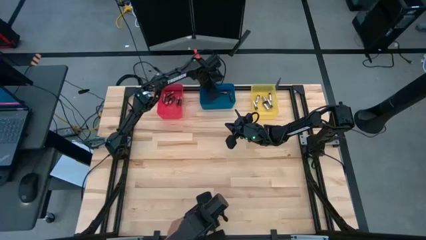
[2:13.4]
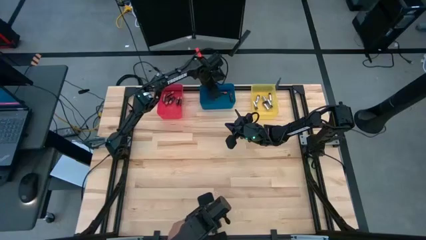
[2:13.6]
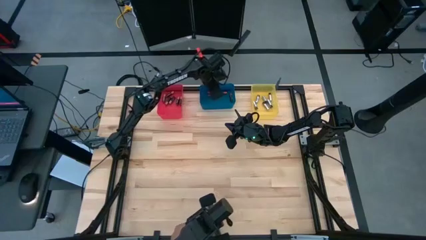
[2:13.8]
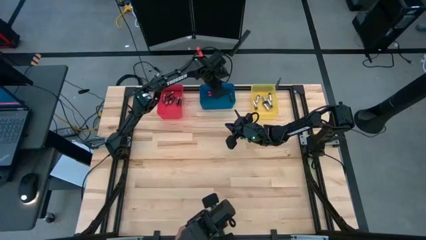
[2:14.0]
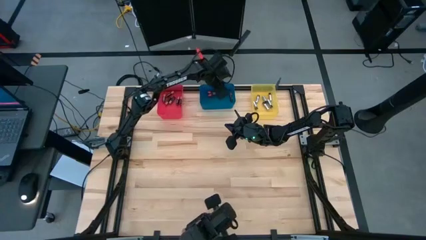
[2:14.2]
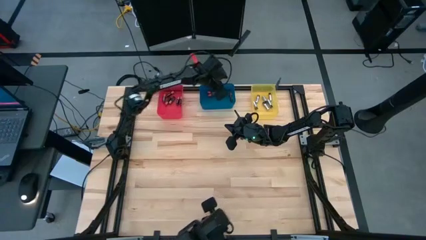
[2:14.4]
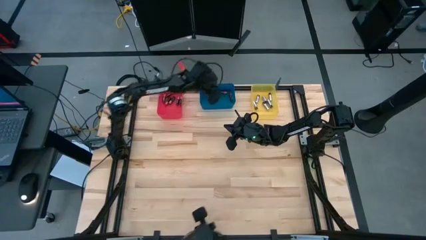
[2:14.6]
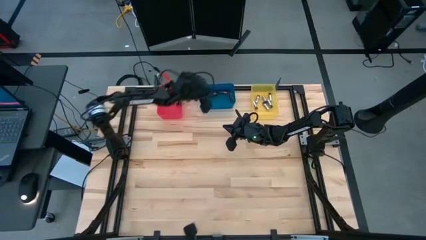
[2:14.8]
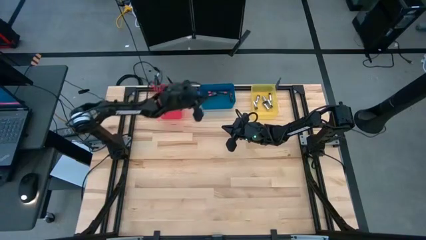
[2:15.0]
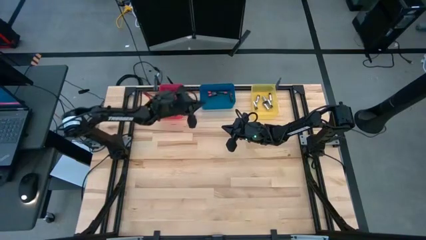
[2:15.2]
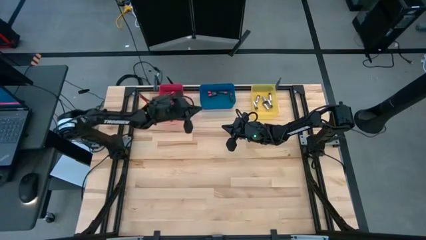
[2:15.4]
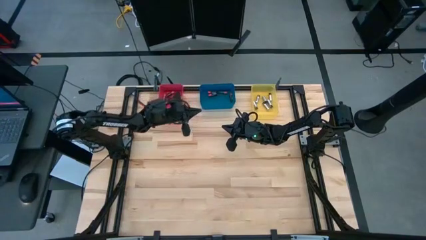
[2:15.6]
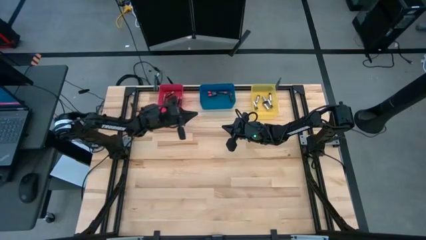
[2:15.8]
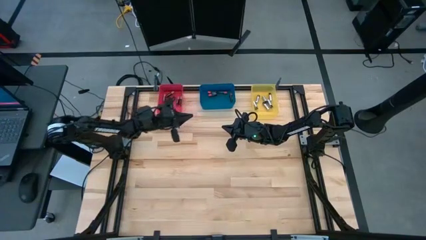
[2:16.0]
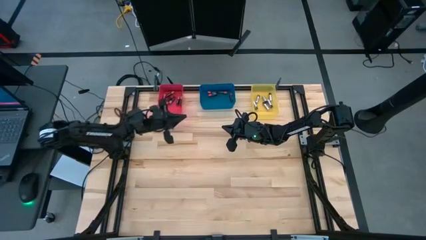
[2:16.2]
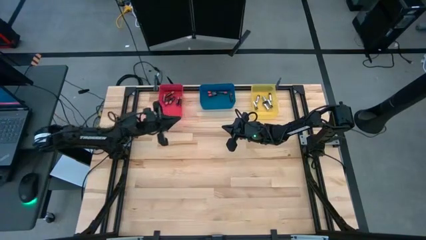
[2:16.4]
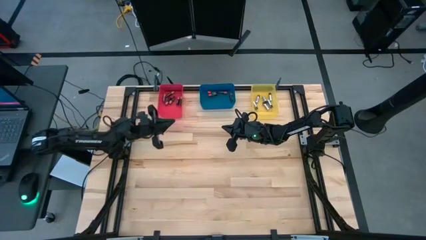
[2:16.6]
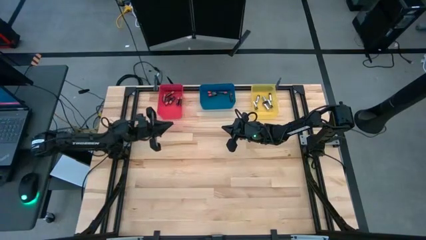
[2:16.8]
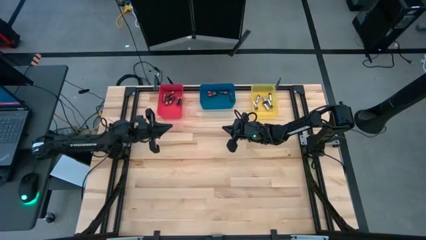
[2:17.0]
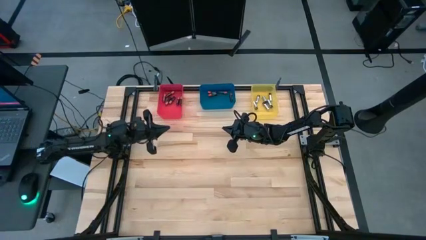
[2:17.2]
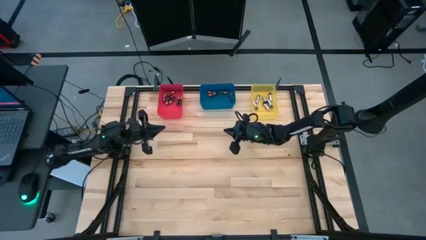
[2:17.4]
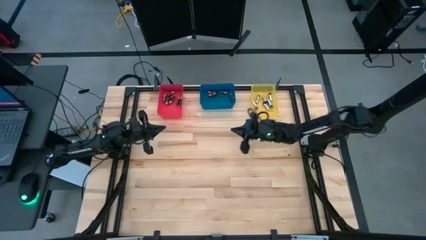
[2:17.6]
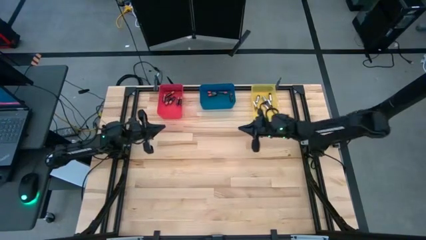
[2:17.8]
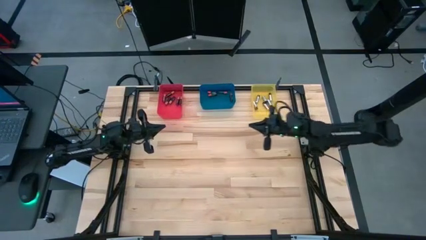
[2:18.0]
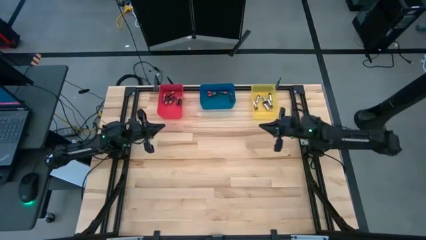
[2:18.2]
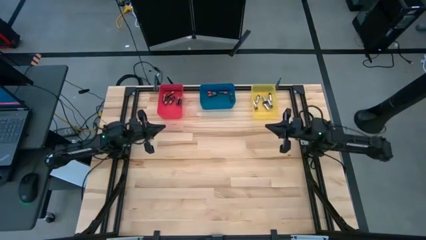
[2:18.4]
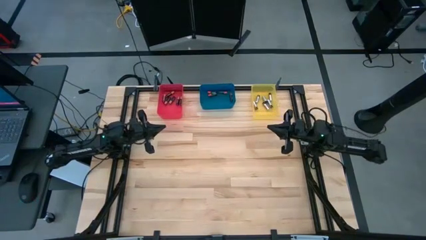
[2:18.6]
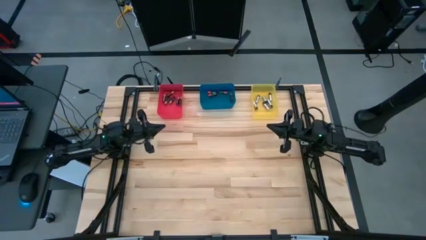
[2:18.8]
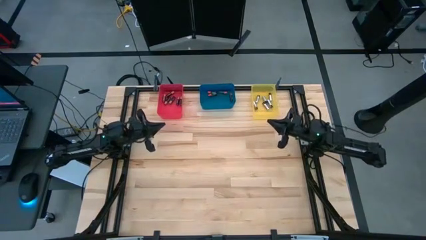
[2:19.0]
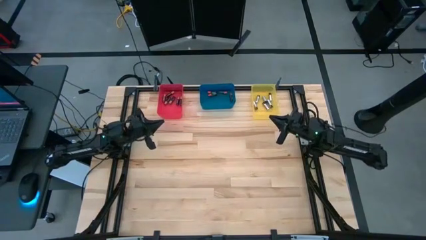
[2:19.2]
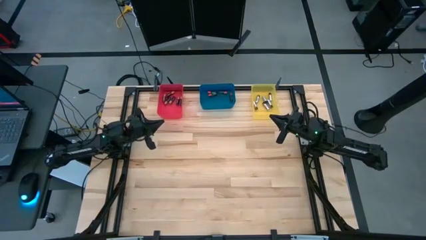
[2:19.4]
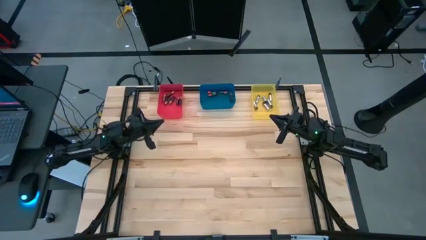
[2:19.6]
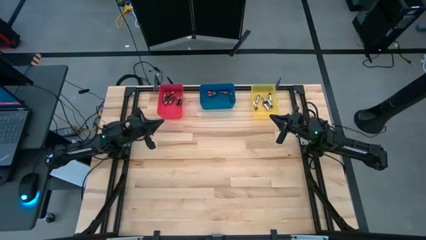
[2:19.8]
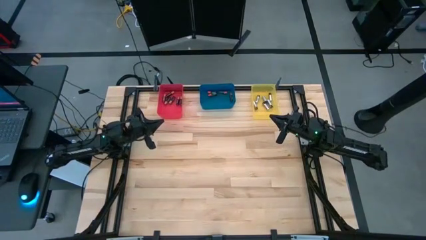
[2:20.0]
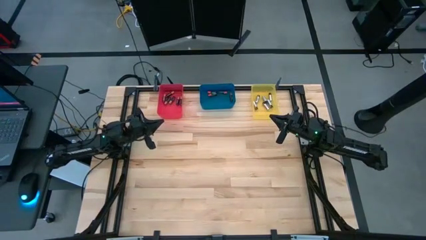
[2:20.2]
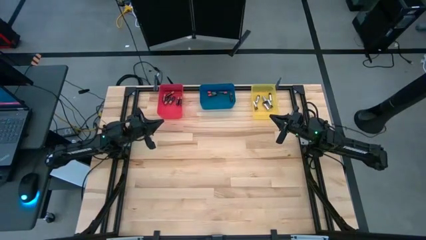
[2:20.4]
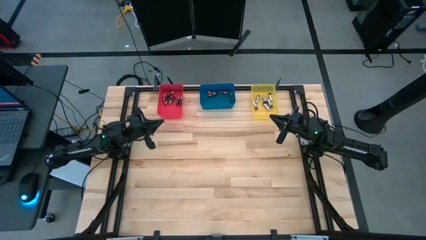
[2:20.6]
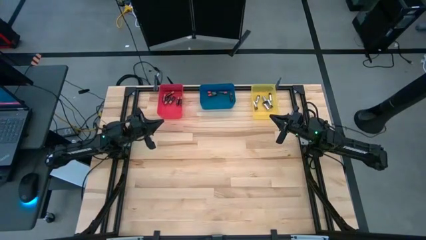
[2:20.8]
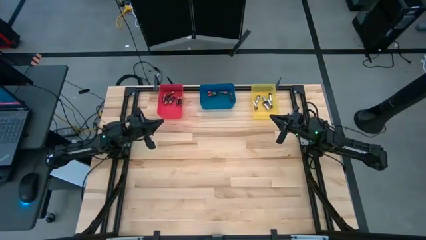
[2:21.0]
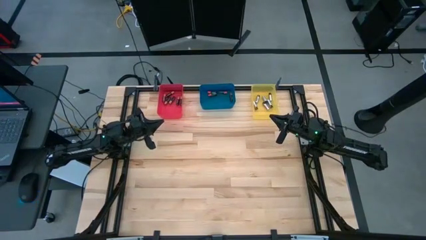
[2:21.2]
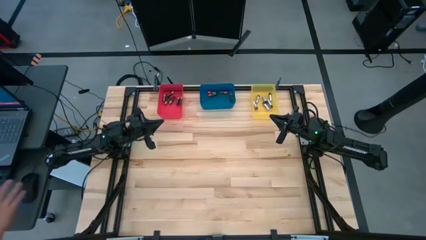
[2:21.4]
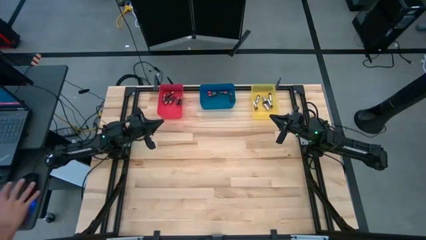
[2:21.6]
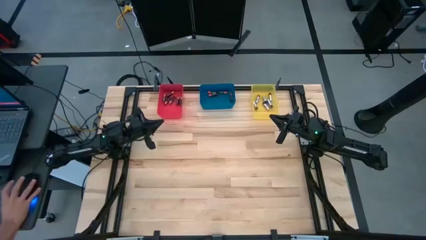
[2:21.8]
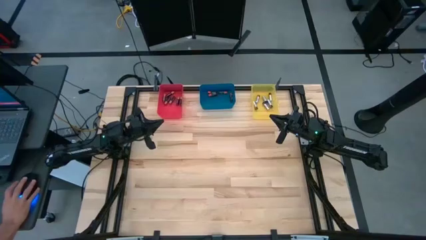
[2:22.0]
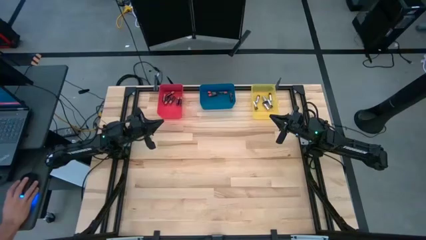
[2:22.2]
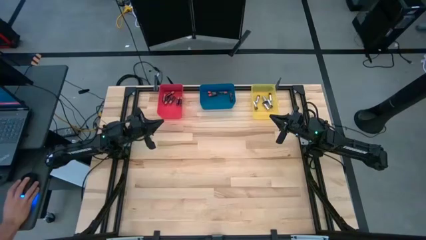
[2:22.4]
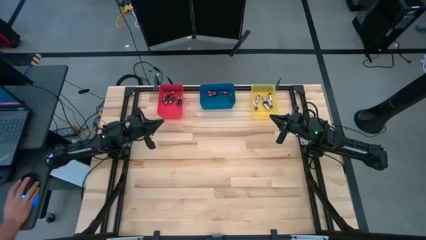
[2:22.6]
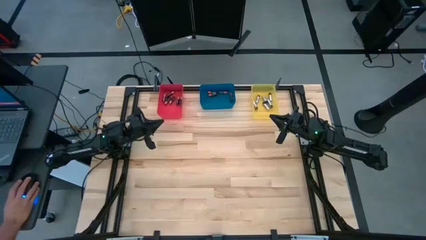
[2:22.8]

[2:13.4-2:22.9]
Task: Sort batteries
Return to Home Position

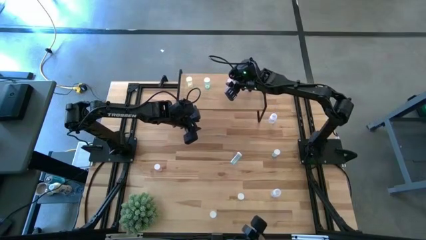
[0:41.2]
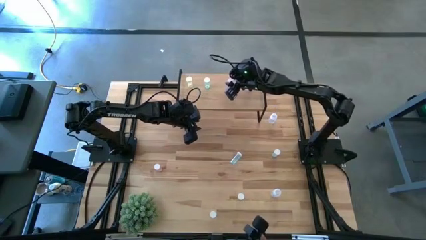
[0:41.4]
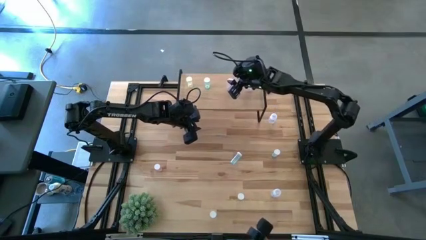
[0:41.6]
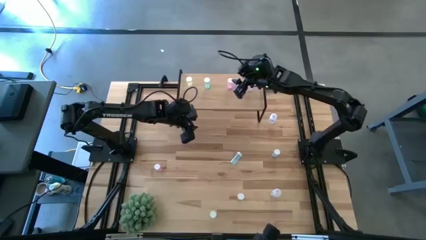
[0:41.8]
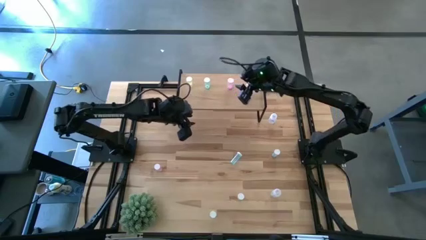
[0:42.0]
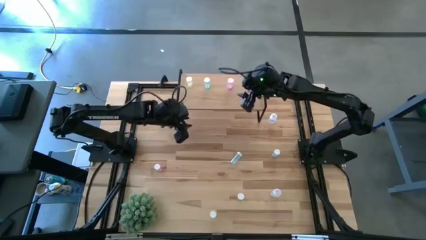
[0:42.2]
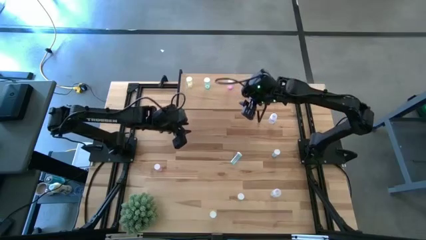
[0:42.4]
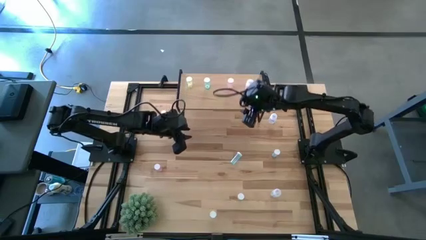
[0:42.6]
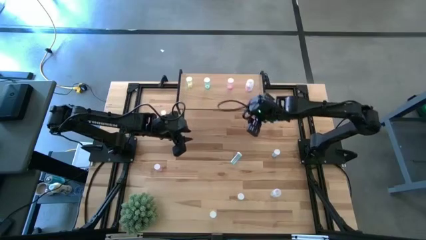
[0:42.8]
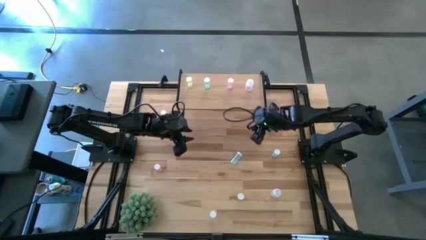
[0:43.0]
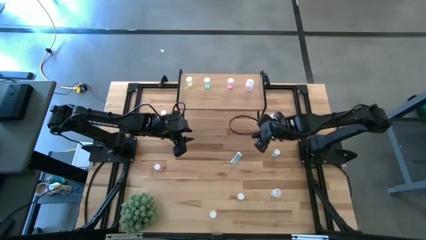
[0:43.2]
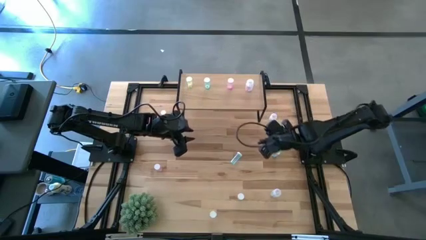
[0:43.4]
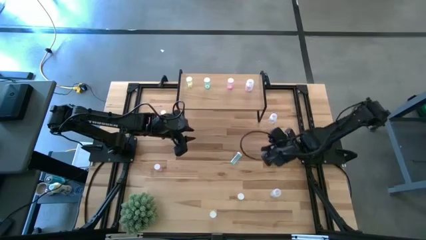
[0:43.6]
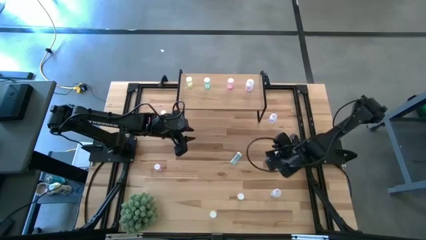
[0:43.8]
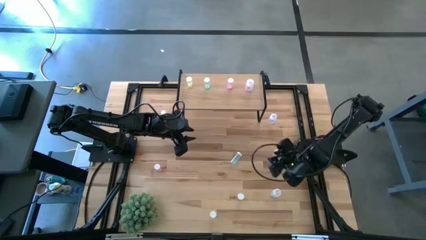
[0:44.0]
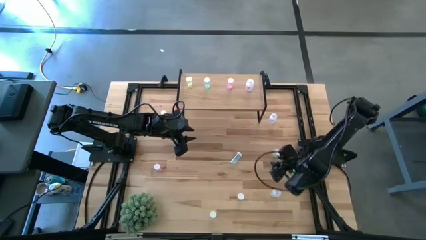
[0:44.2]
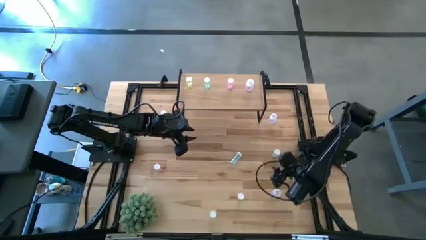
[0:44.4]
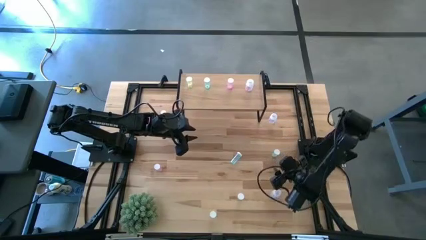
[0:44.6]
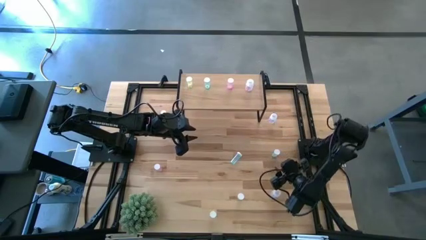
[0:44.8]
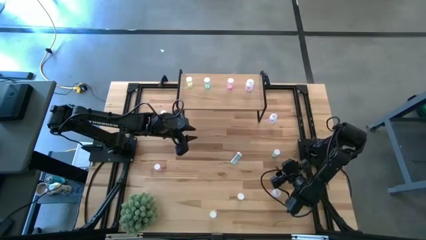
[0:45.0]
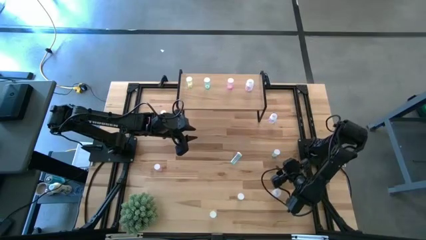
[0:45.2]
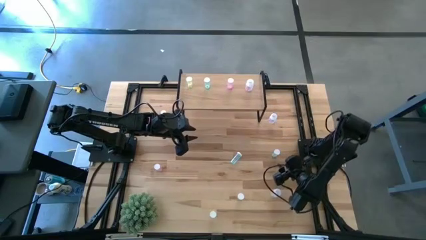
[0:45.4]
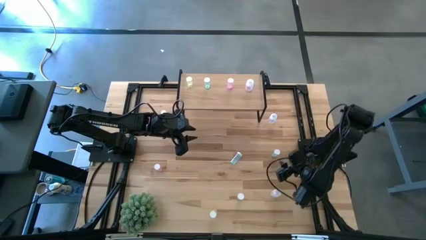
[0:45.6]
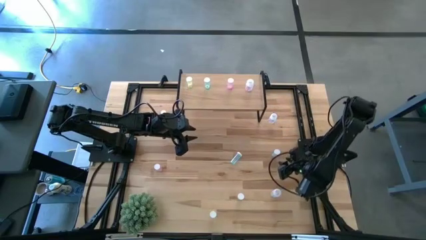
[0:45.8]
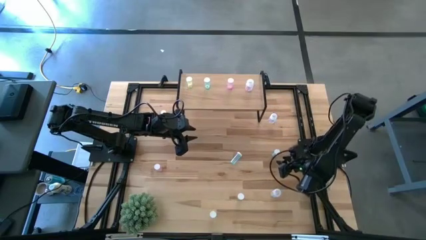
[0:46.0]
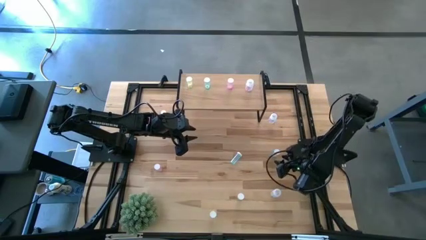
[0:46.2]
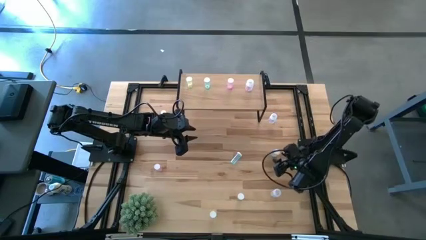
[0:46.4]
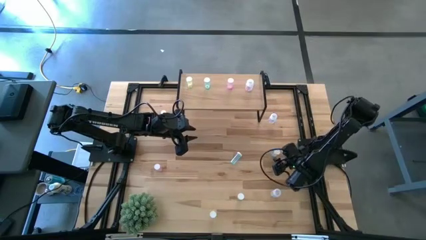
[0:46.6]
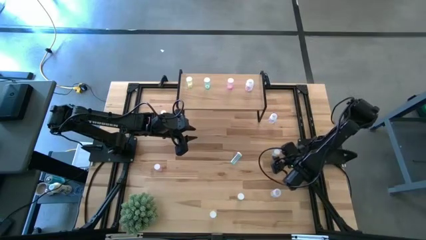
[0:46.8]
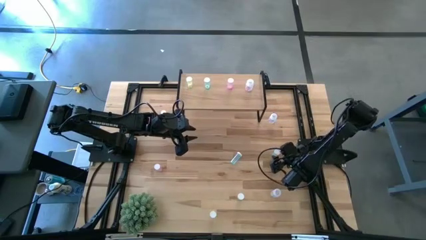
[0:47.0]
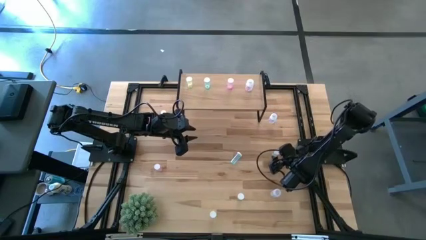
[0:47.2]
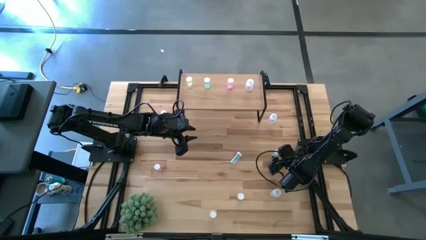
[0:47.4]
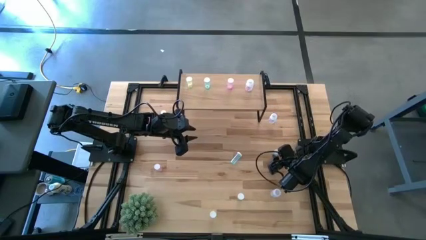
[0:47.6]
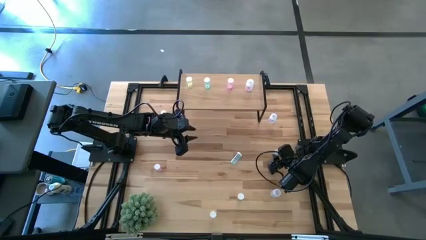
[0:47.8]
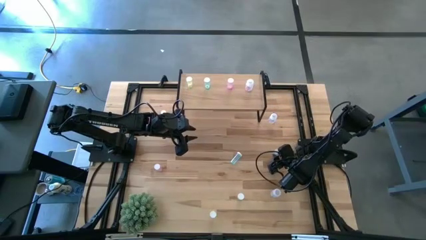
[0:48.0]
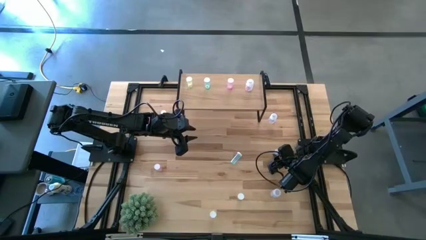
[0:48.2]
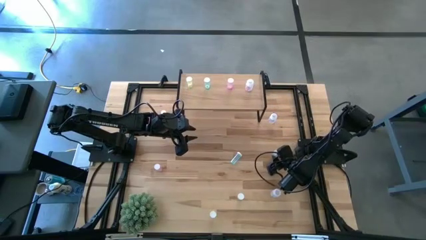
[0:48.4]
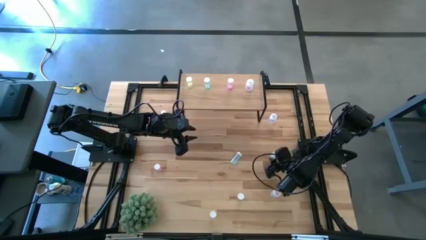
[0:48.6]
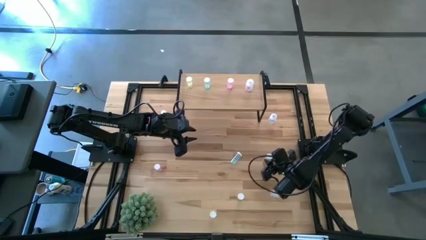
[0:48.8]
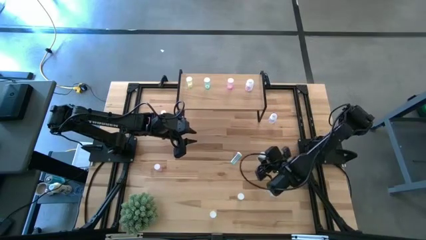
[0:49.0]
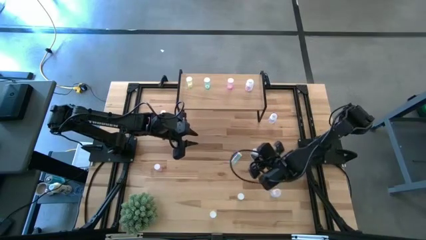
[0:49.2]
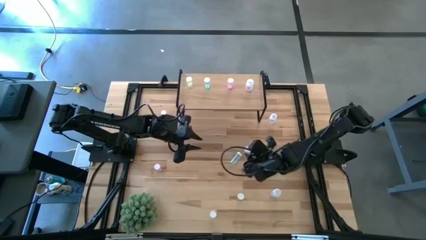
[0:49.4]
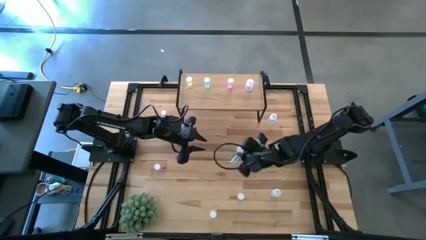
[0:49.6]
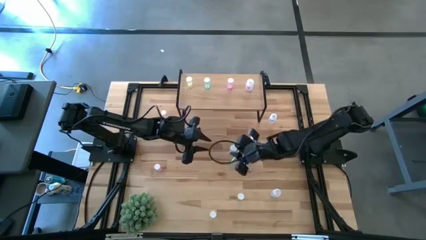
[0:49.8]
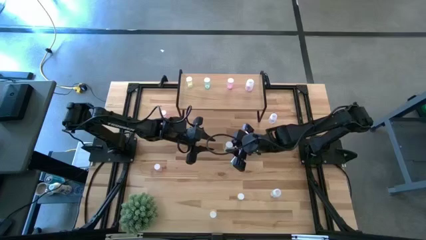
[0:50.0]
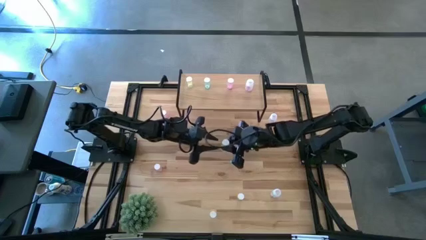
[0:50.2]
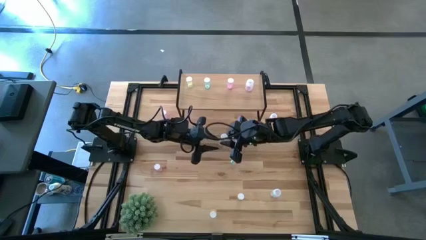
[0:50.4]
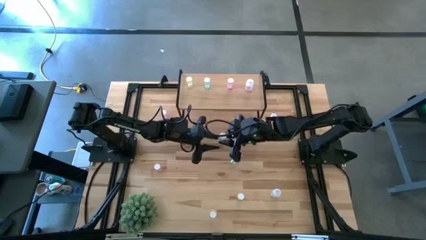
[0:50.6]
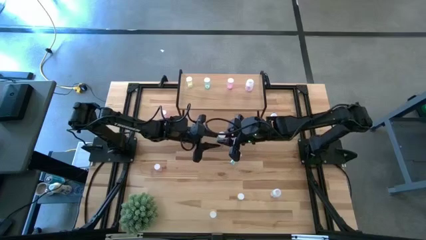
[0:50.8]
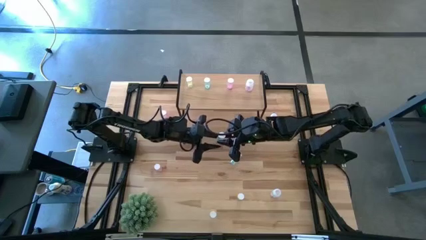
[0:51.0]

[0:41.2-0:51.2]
Task: Pick and place medicine bottles onto shelf by color
Put the right blue pill bottle and align it with the other blue pill bottle on the shelf
